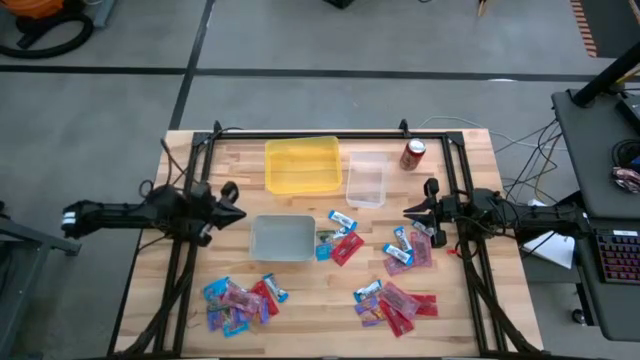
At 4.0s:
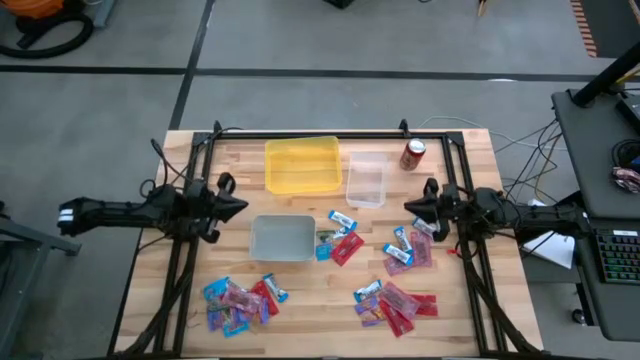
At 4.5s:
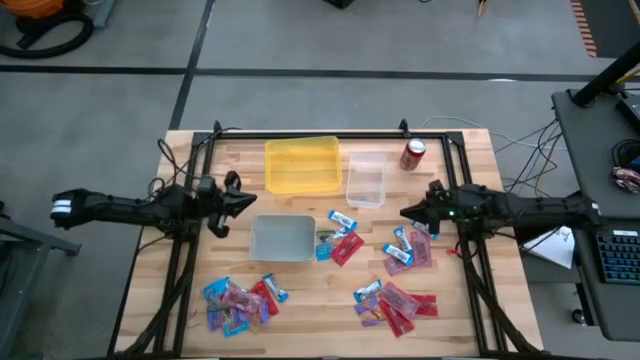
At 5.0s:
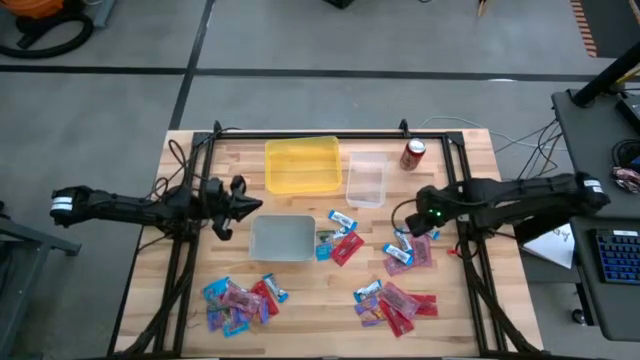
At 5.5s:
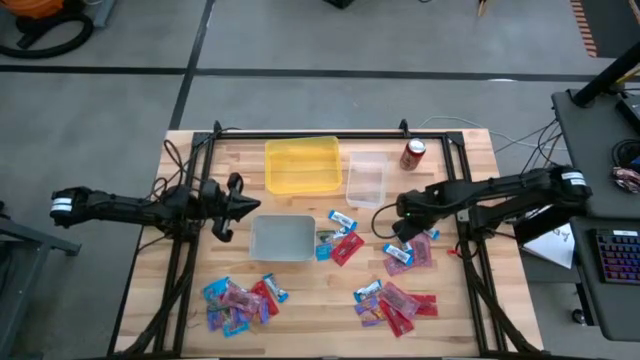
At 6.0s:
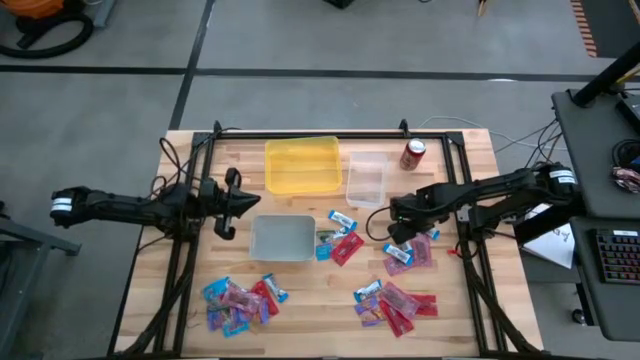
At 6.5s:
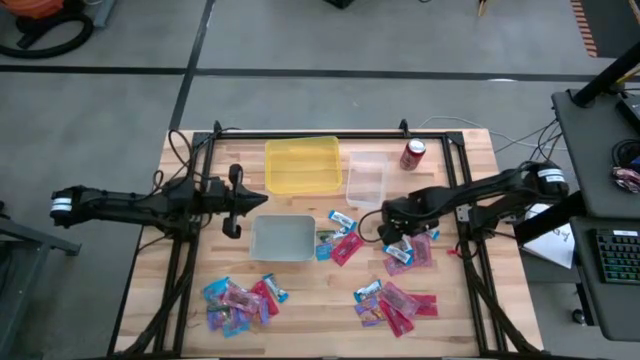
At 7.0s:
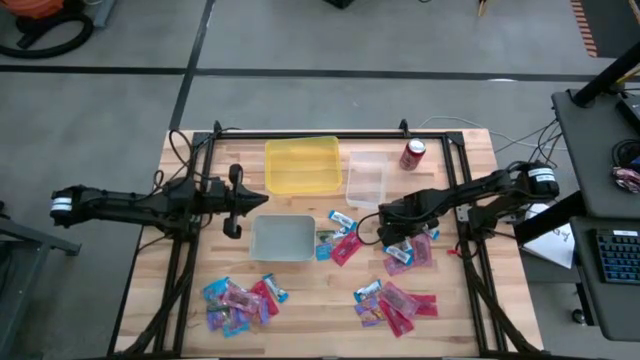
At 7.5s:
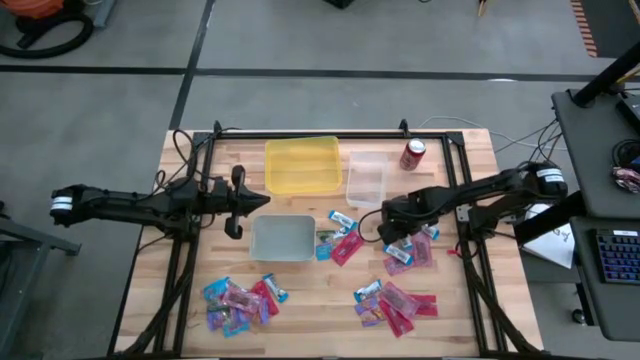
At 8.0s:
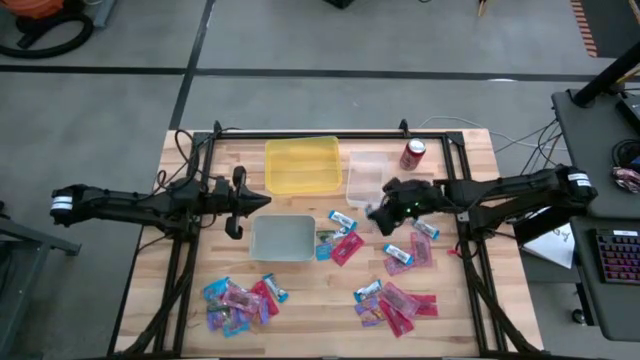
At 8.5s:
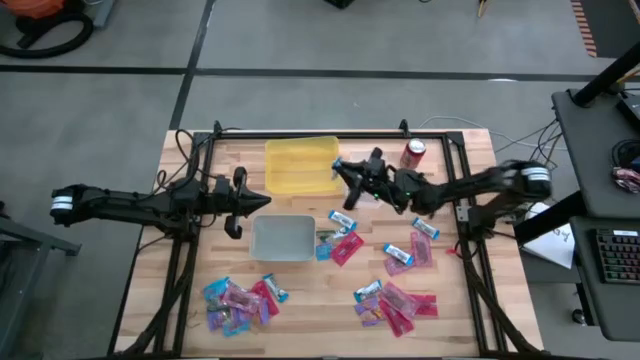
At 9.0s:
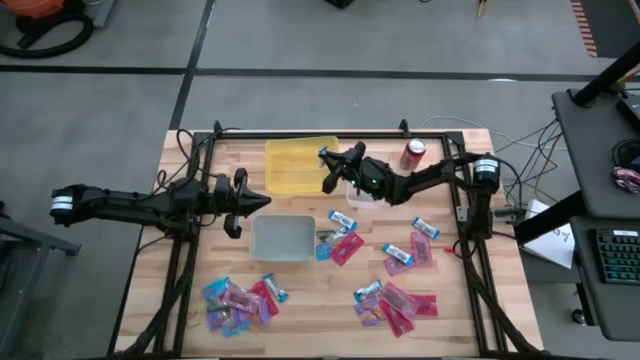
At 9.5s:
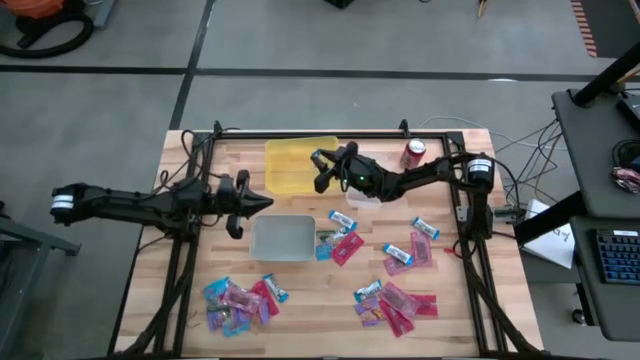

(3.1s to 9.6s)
Task: Sort candy
Put the white candy into the yellow bin

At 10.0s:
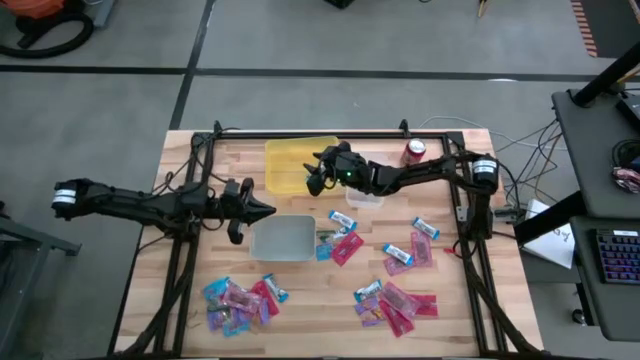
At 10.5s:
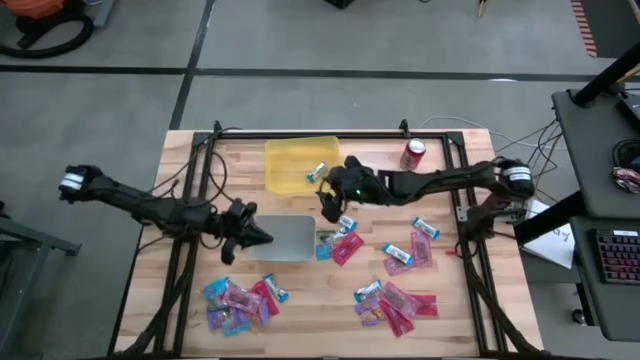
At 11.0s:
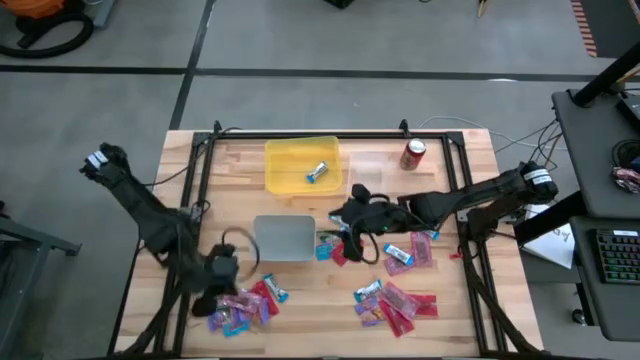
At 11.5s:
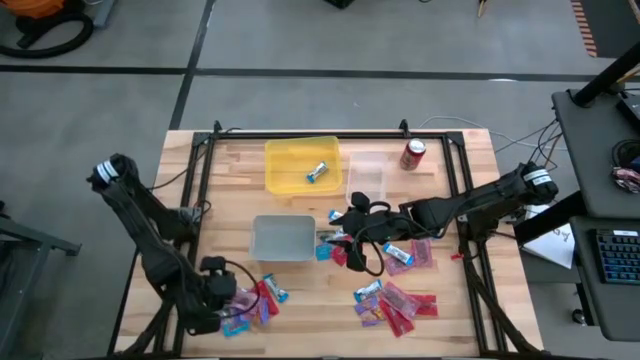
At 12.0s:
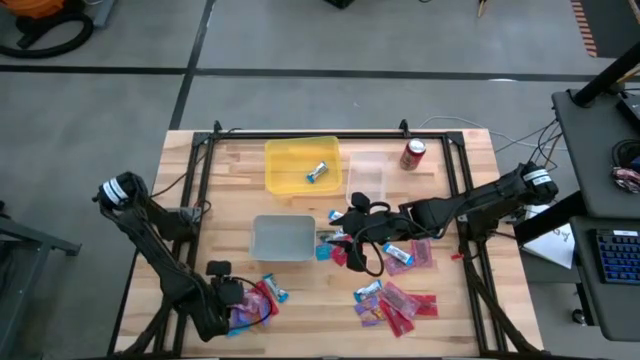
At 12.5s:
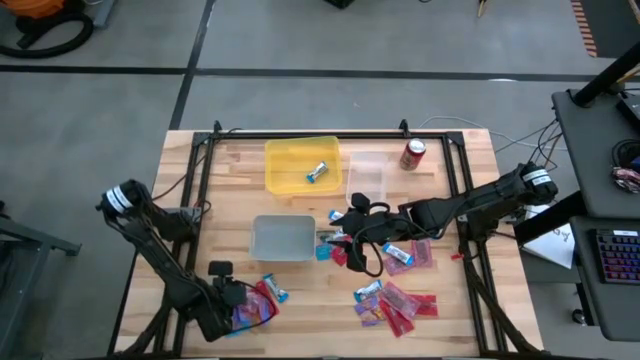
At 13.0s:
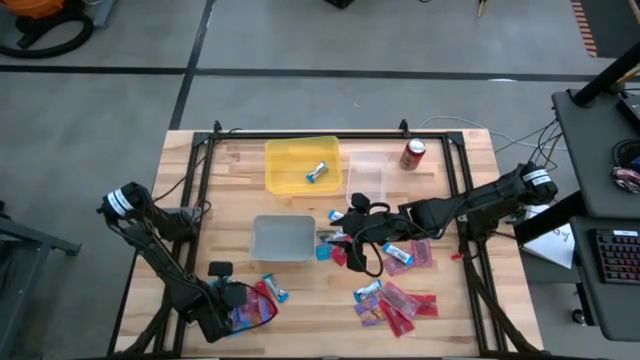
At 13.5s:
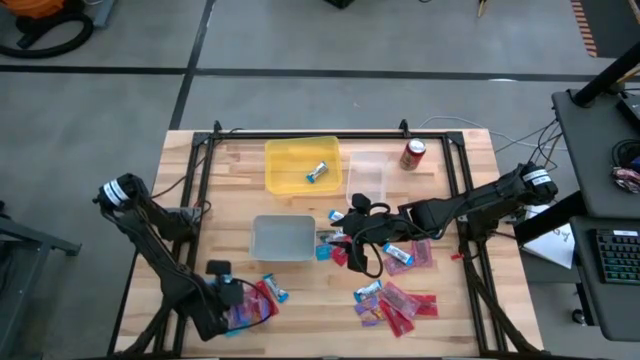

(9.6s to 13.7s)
Put the red candy into the gray bin

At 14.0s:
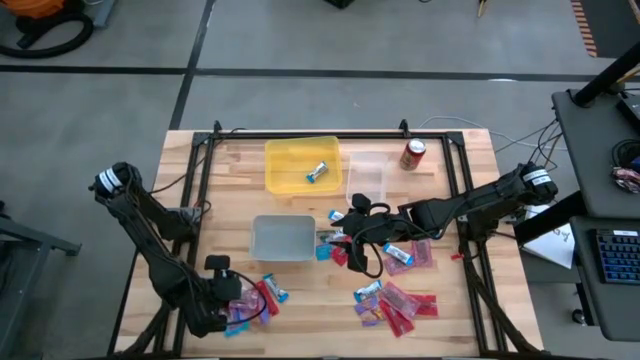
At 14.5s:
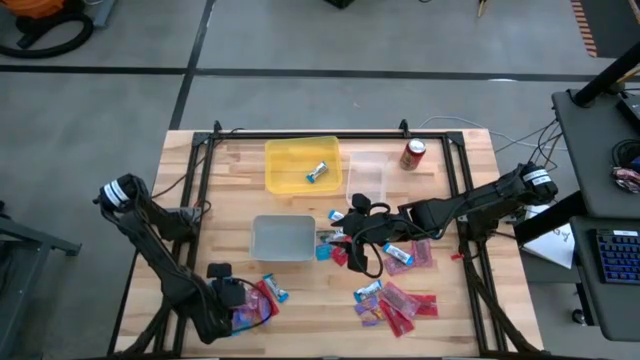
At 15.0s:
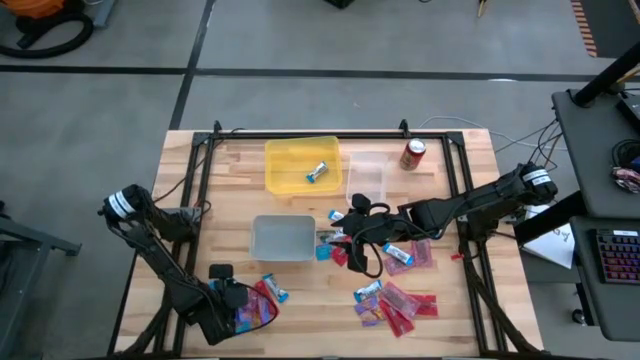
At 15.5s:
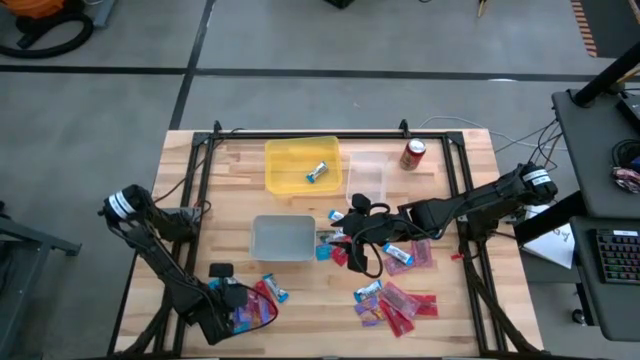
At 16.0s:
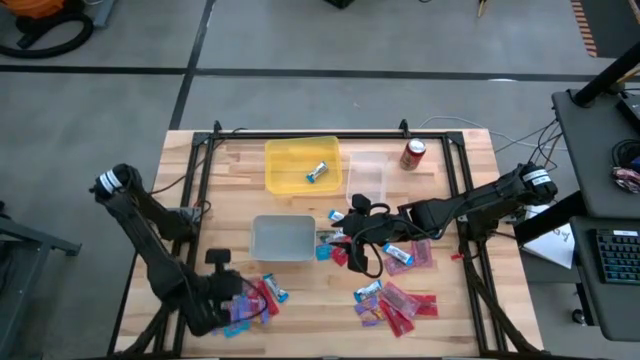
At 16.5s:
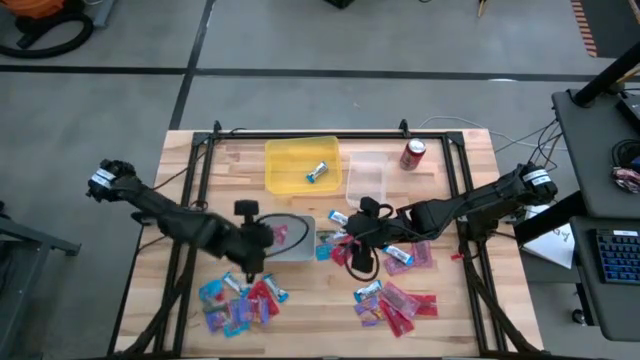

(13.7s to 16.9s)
Put the red candy into the gray bin

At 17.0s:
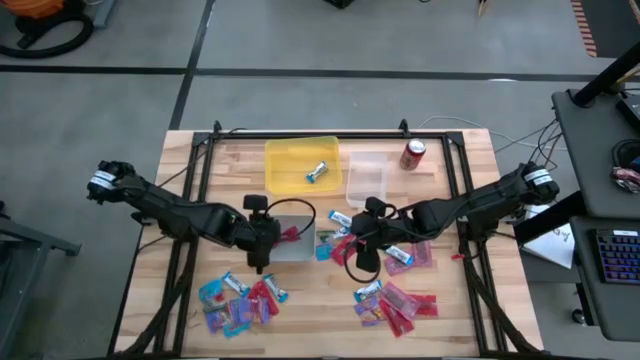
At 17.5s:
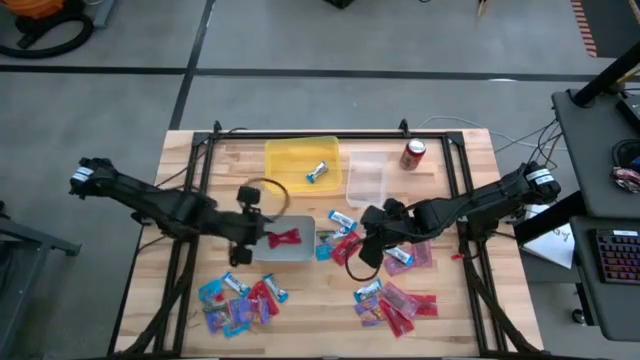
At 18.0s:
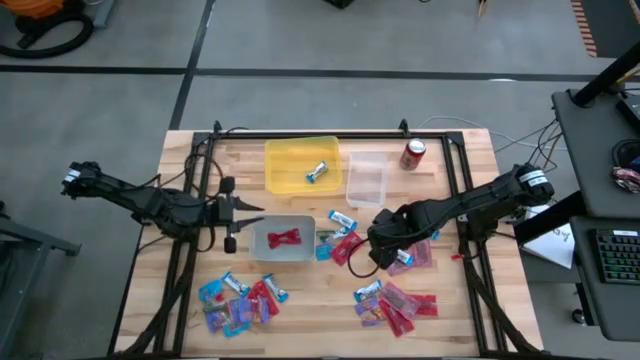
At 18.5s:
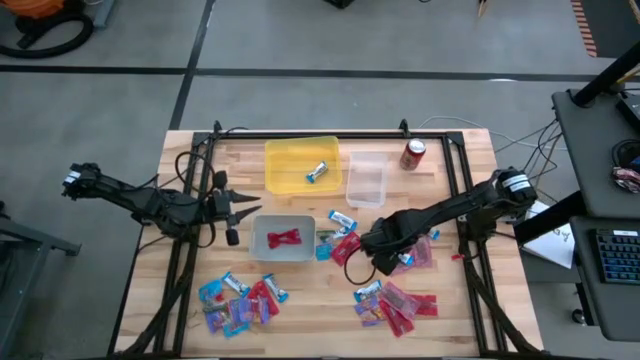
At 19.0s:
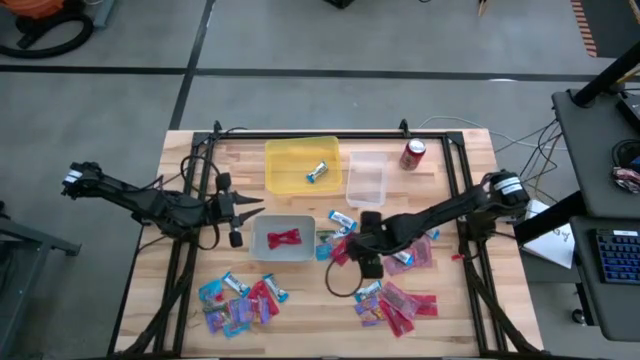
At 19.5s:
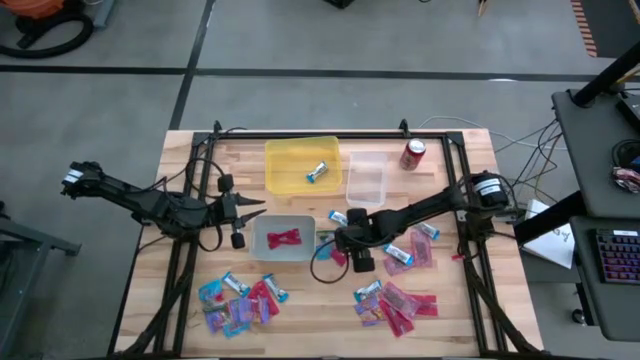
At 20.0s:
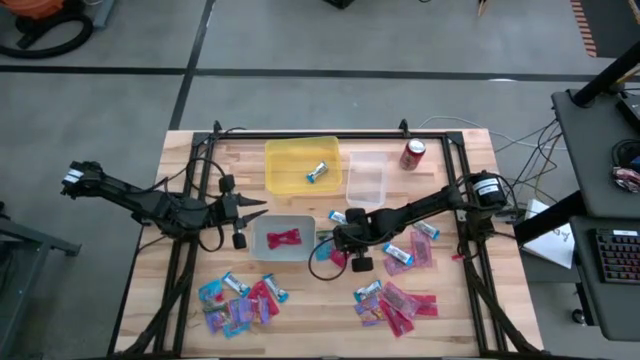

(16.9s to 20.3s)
Put the red candy into the gray bin

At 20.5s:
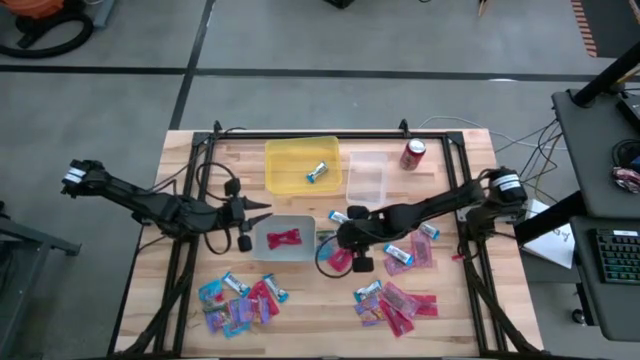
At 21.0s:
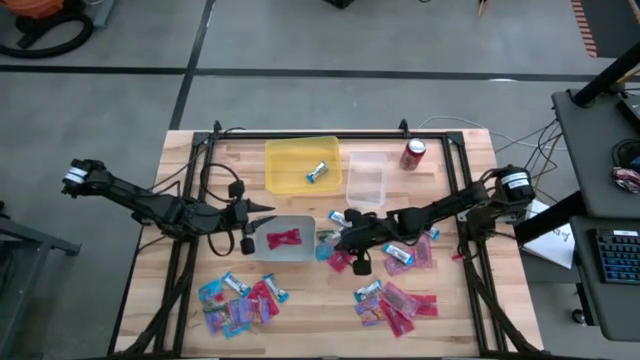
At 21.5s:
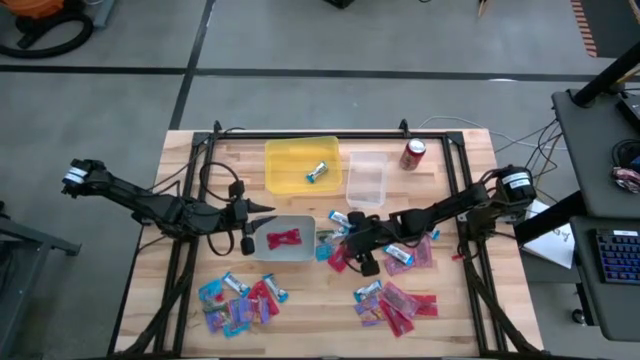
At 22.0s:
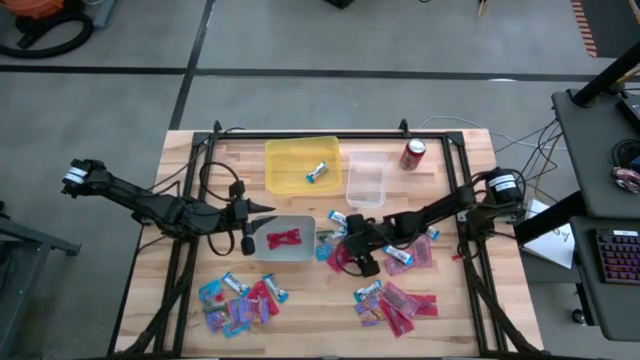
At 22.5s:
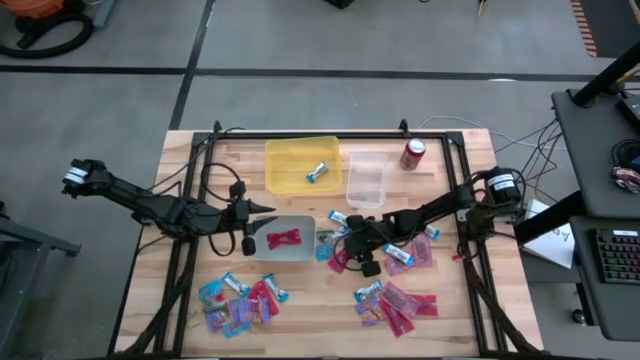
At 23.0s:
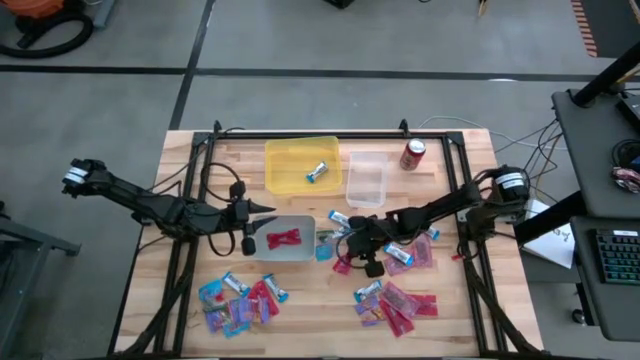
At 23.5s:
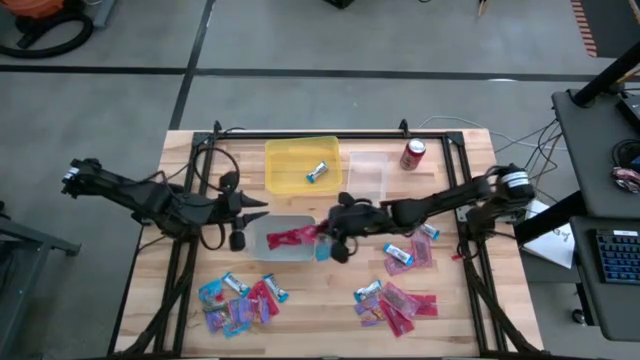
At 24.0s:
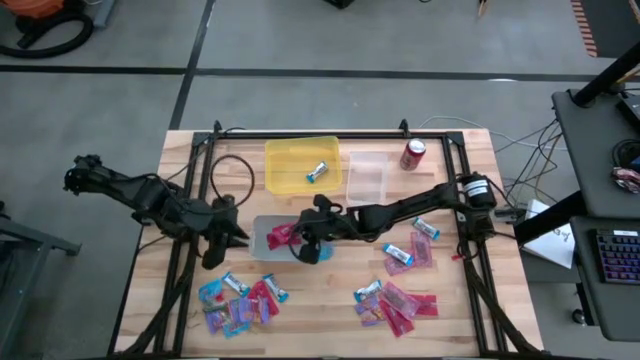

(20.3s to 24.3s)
Put the red candy into the gray bin
